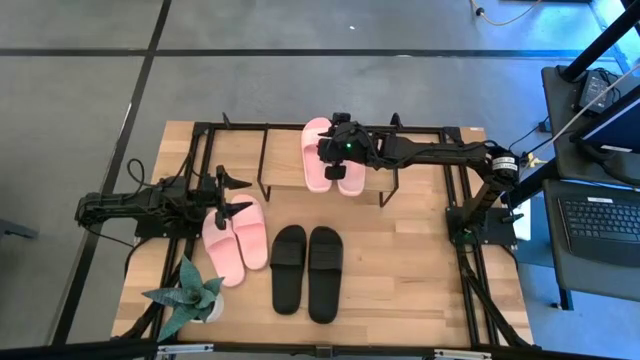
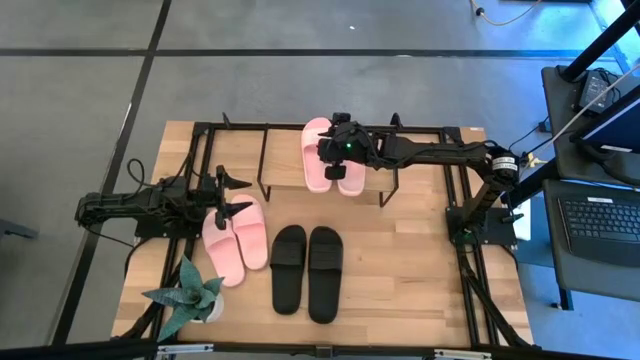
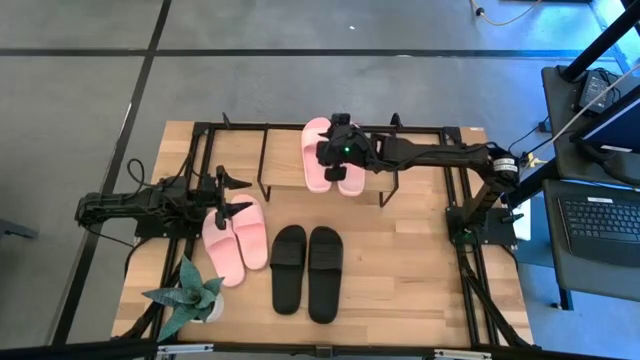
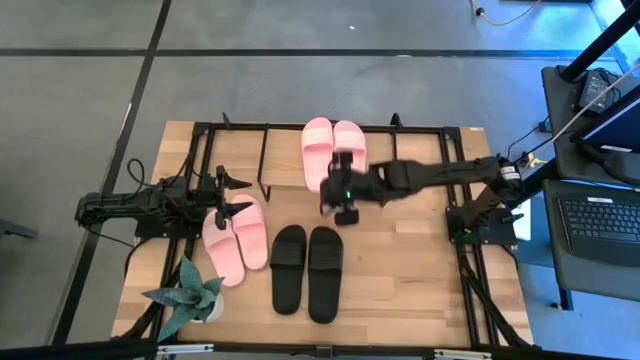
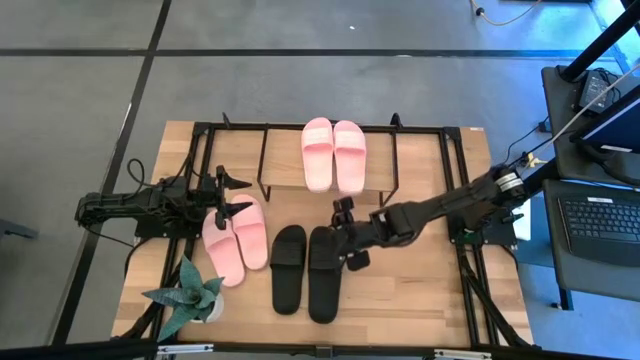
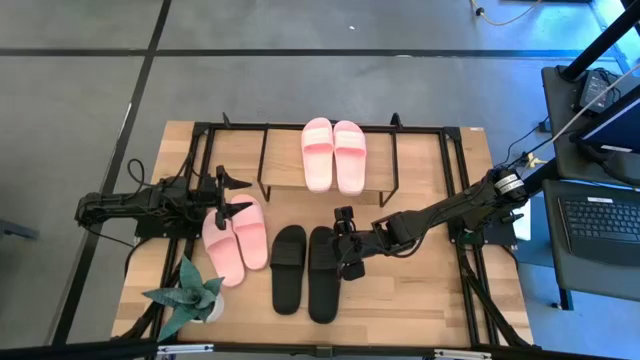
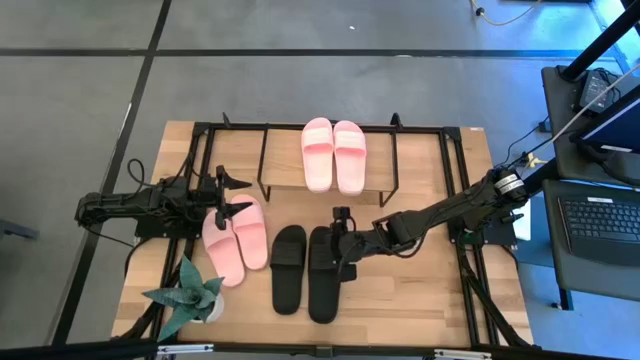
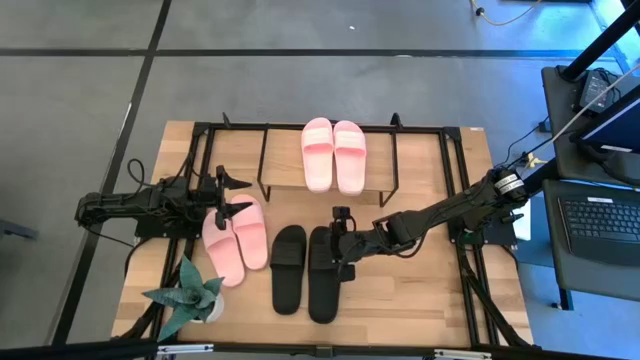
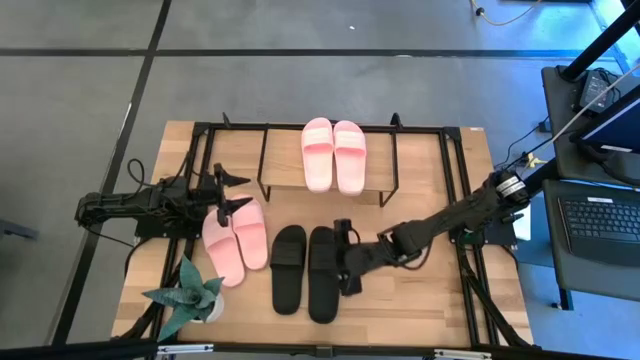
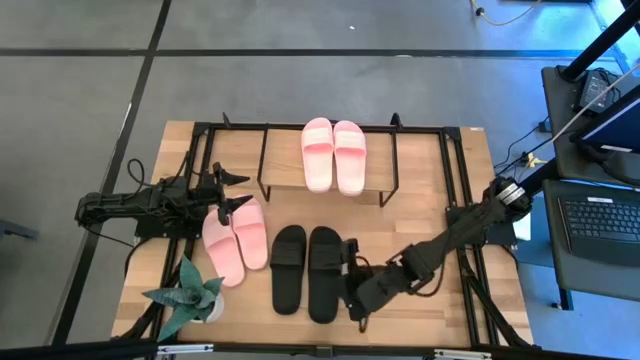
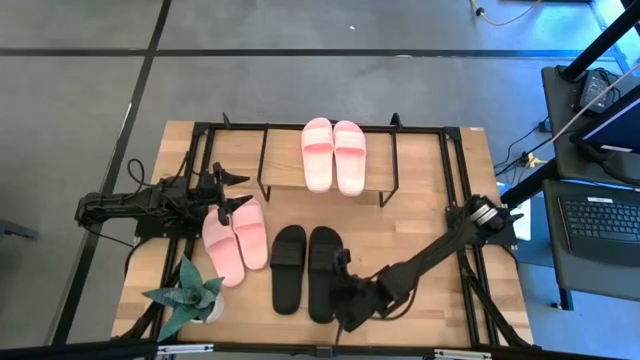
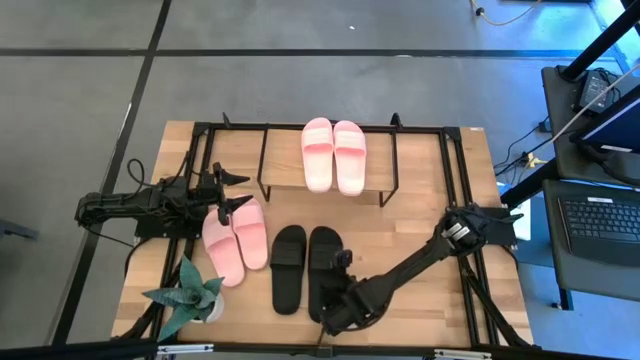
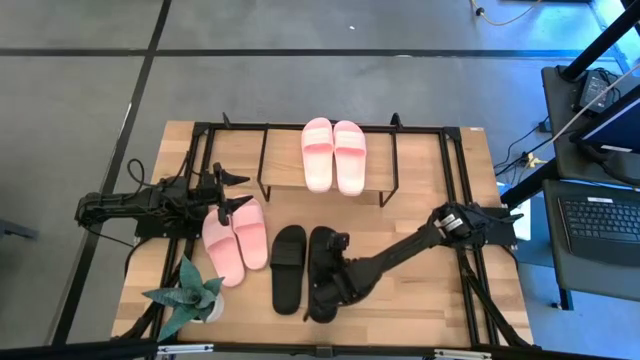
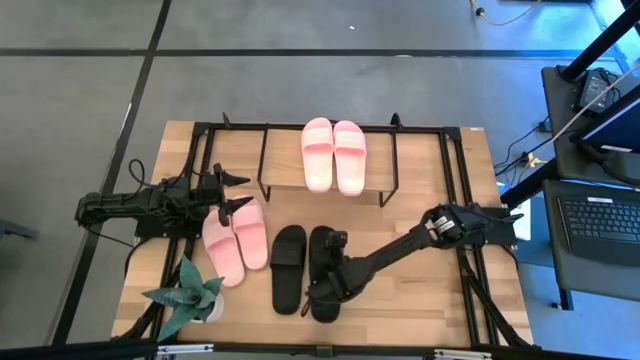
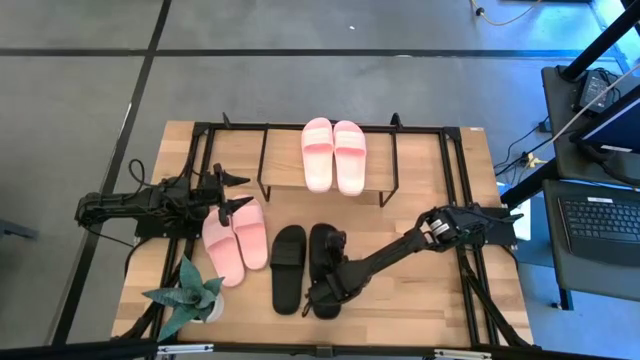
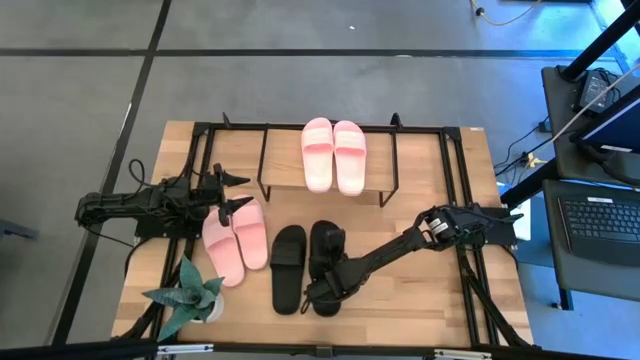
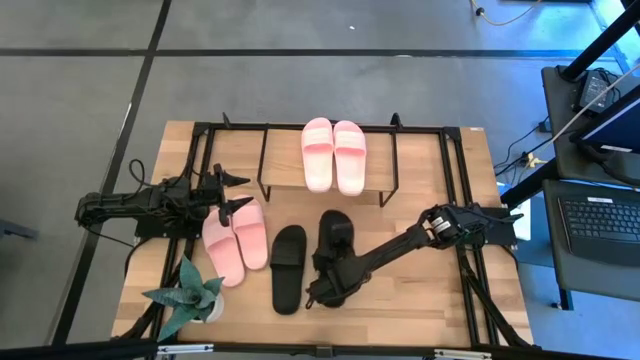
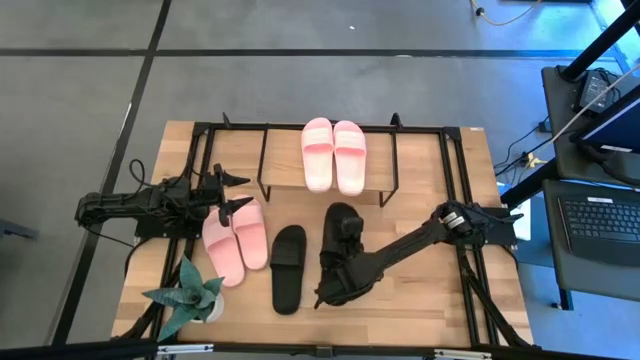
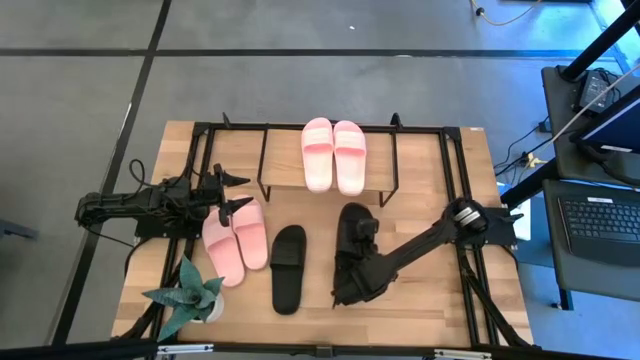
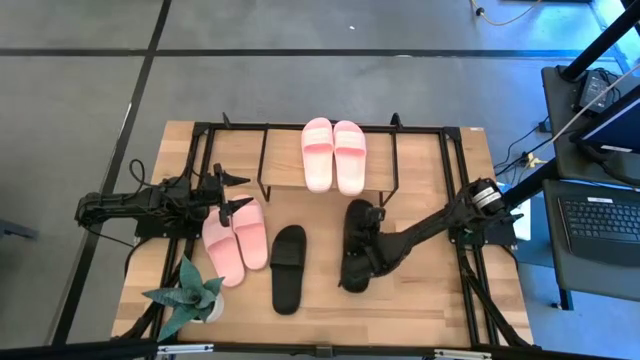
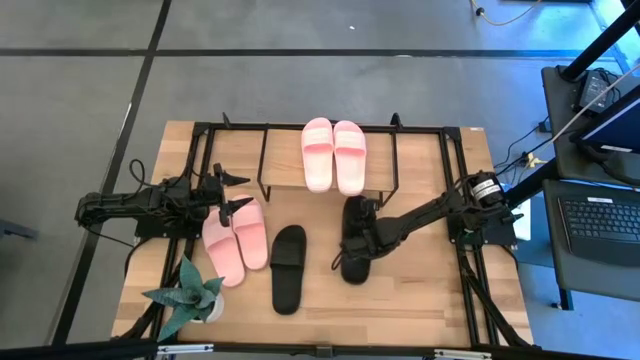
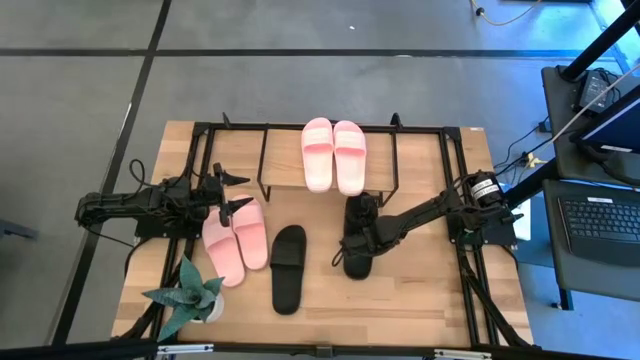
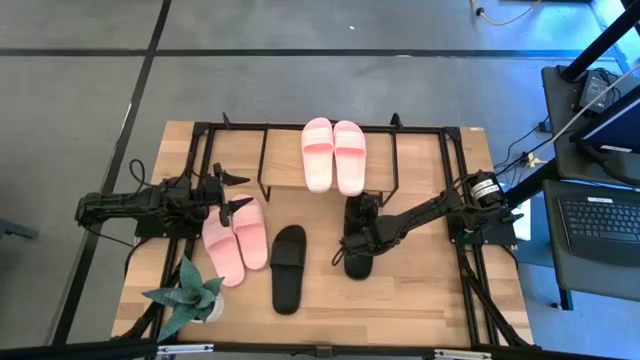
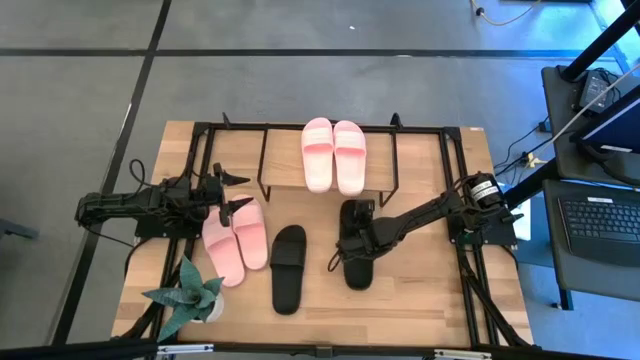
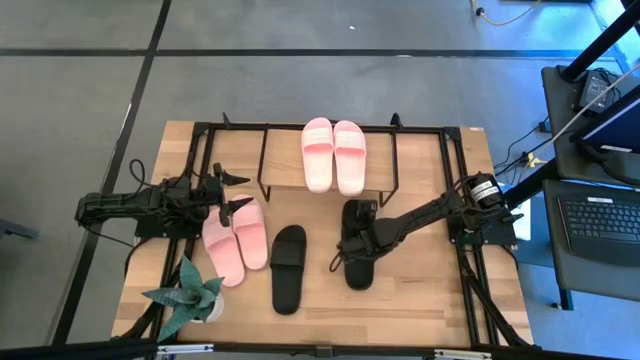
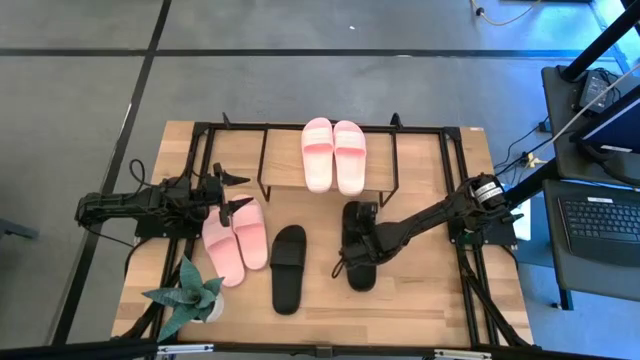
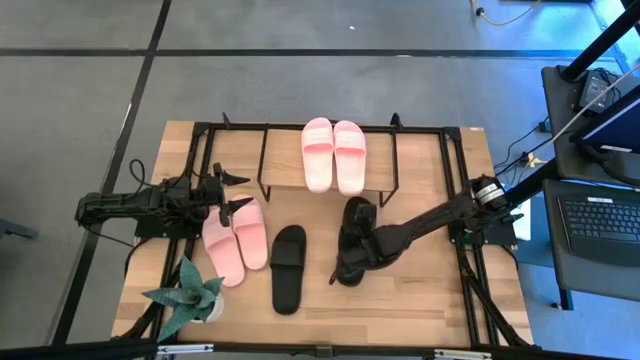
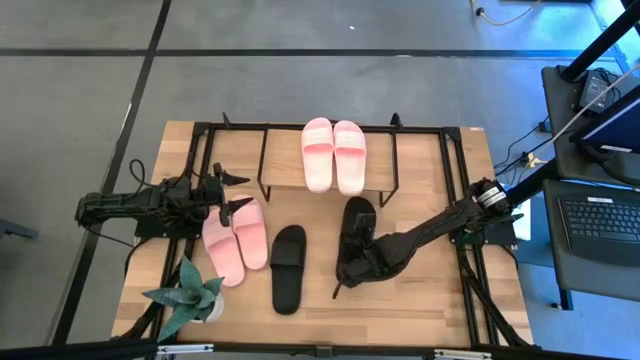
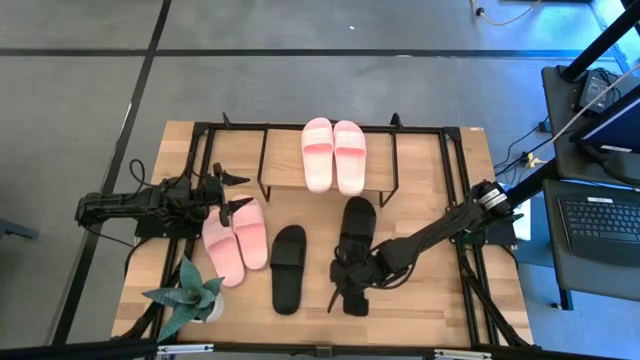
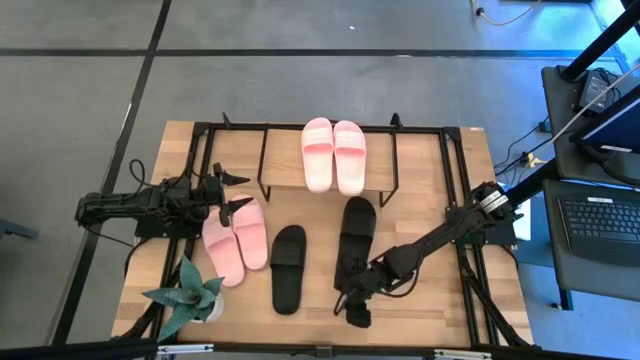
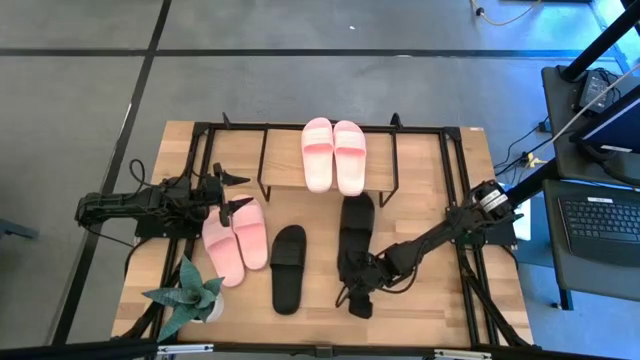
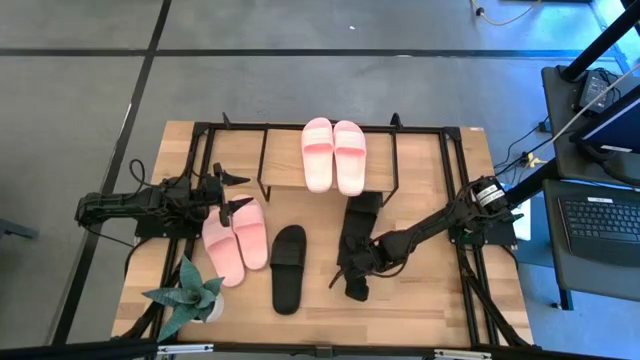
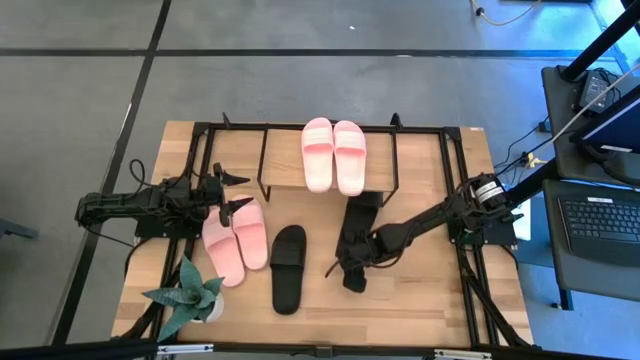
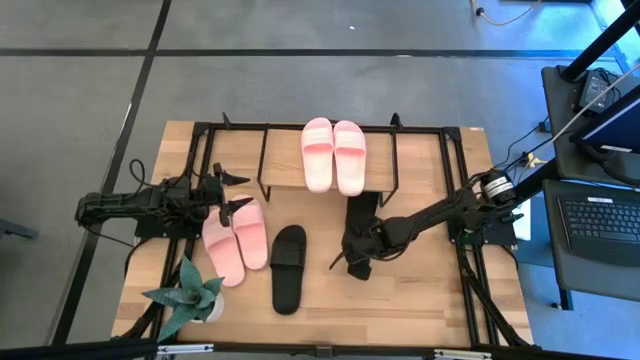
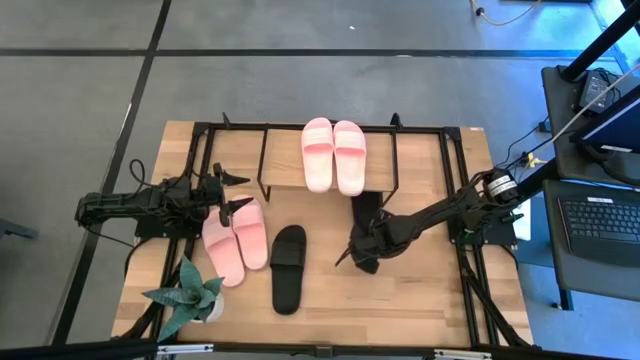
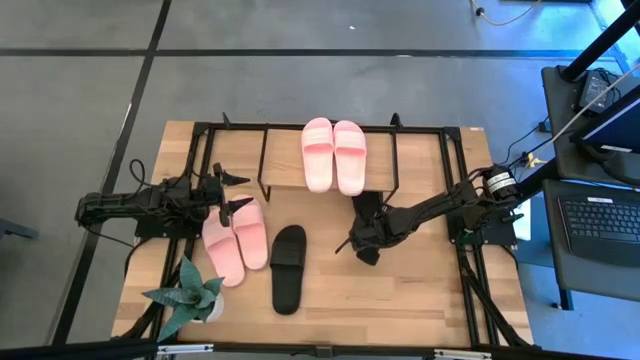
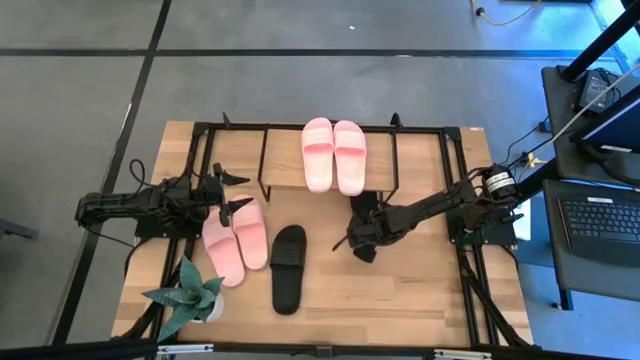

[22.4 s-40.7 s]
Task: Pick and place slides into the shelf
Put the black slide under the shelf

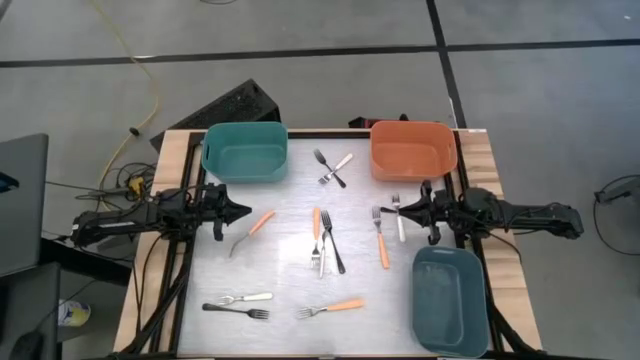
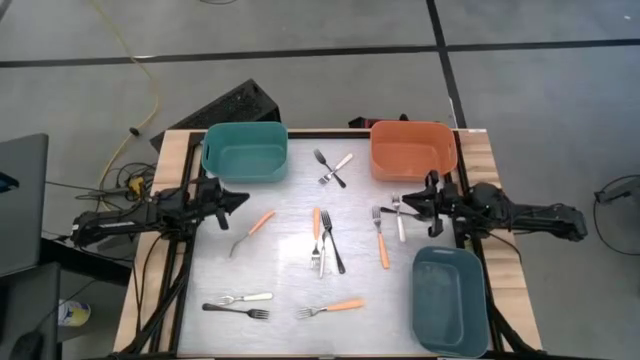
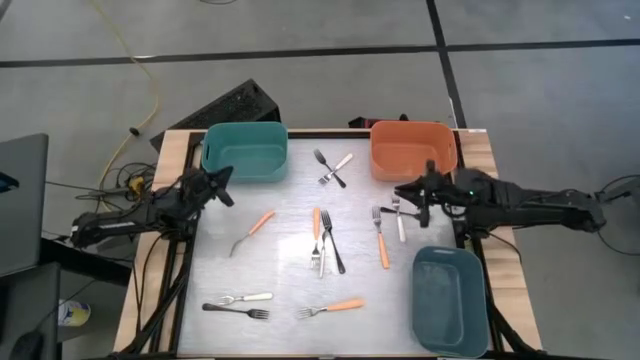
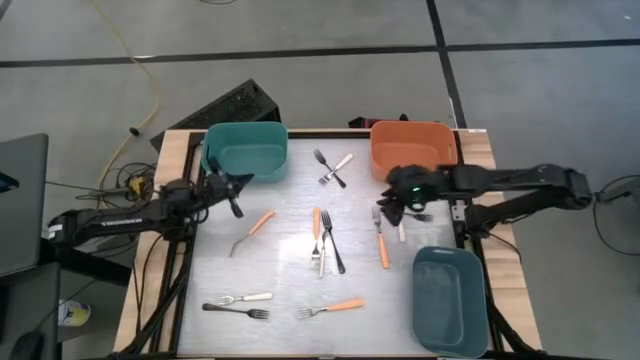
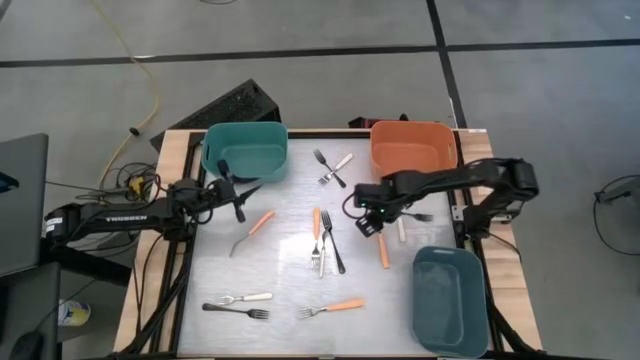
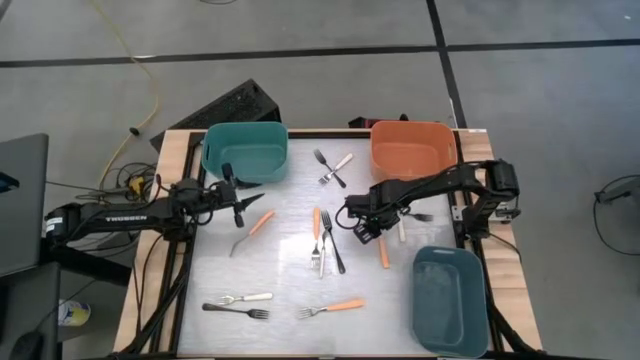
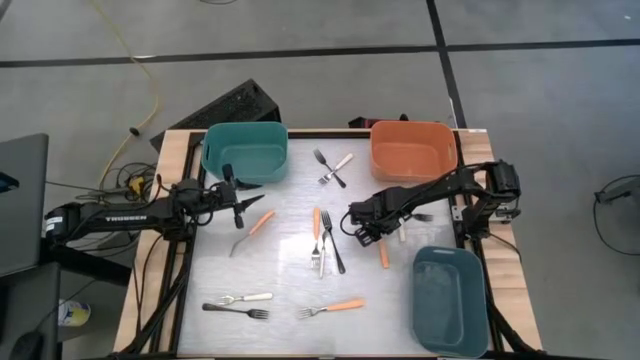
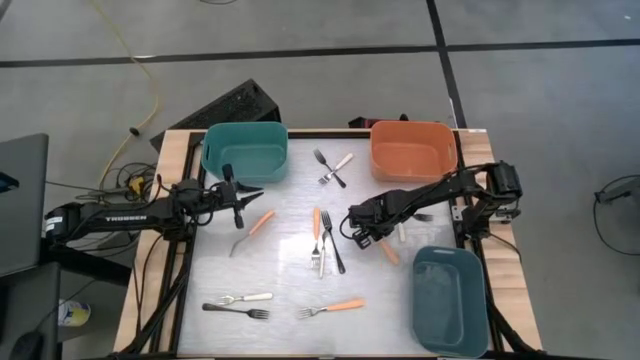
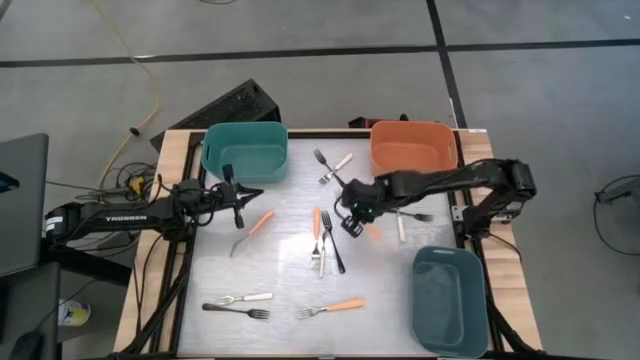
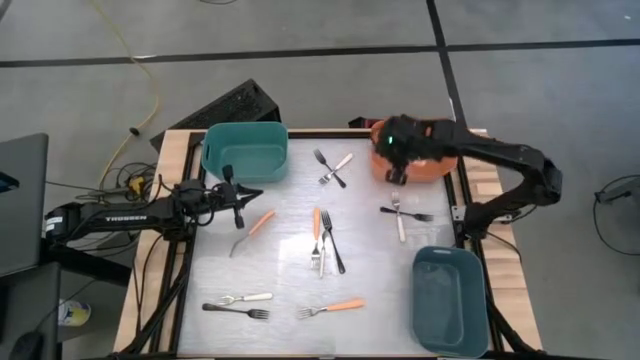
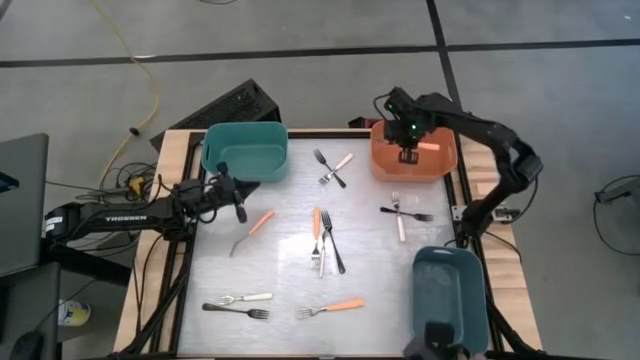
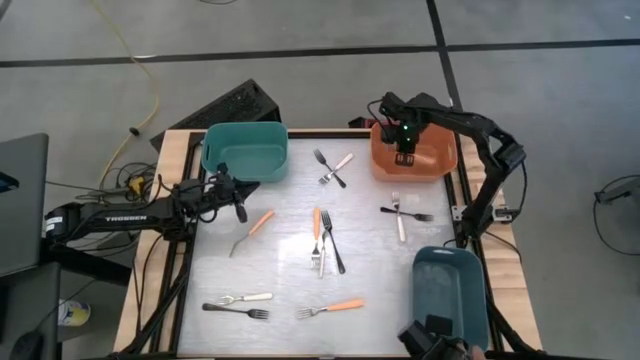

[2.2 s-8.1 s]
Task: Sort silverware by color (type)
Put the top right orange fork into the orange bin
